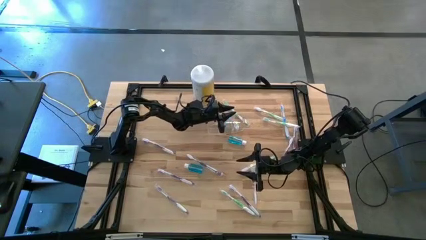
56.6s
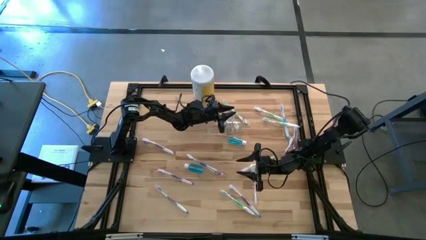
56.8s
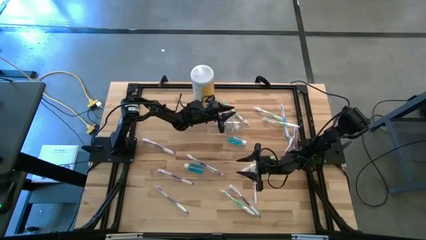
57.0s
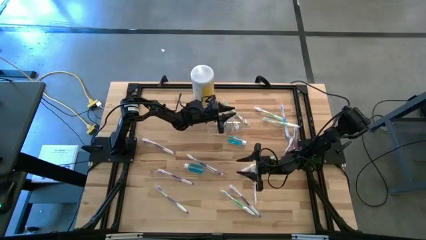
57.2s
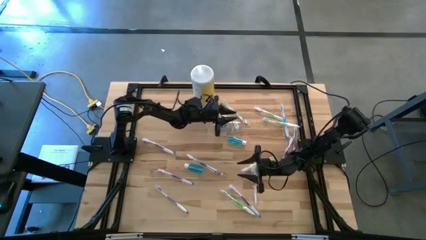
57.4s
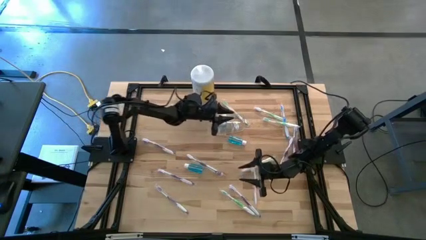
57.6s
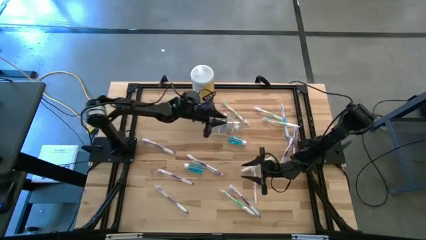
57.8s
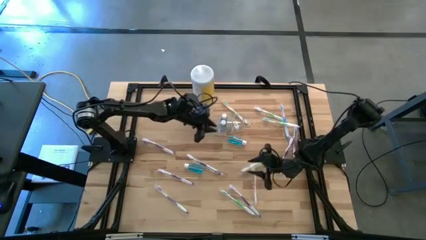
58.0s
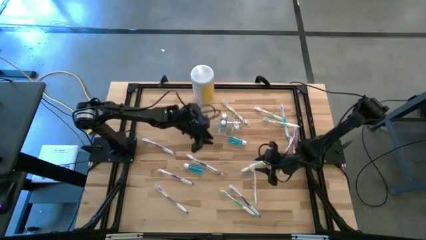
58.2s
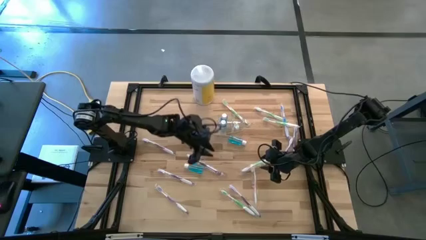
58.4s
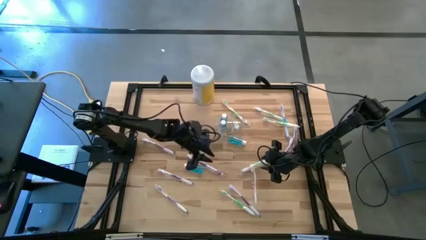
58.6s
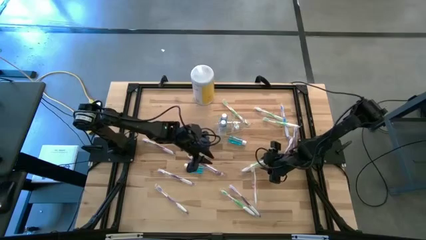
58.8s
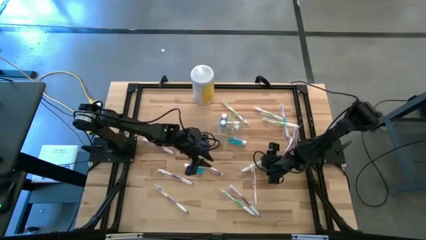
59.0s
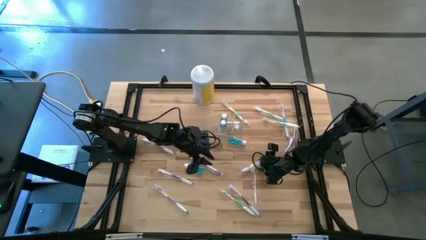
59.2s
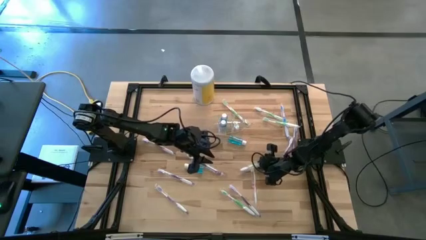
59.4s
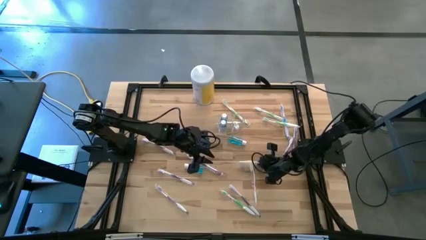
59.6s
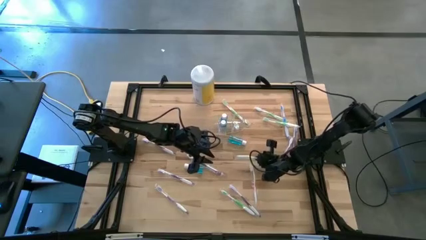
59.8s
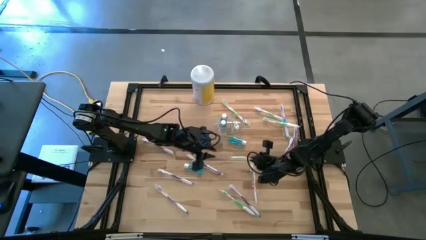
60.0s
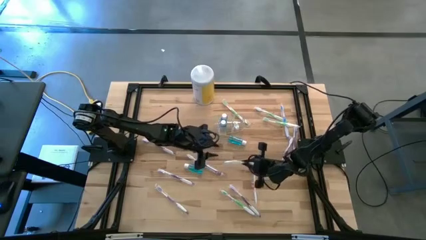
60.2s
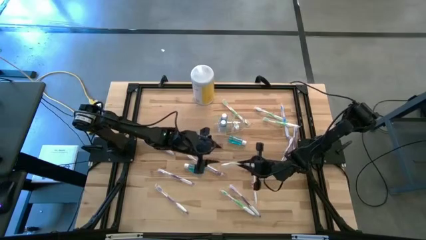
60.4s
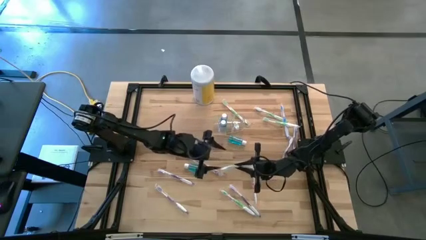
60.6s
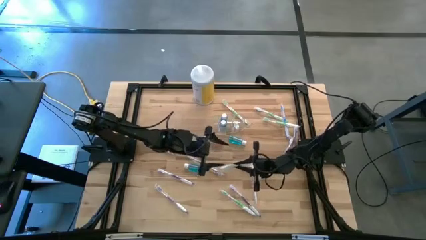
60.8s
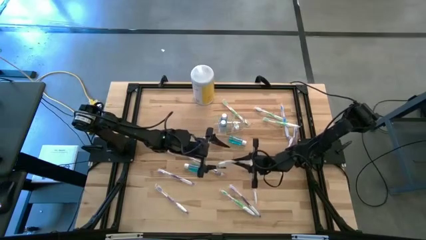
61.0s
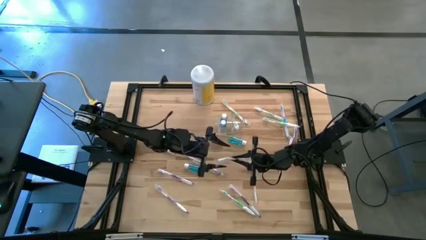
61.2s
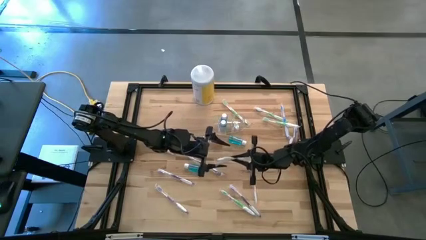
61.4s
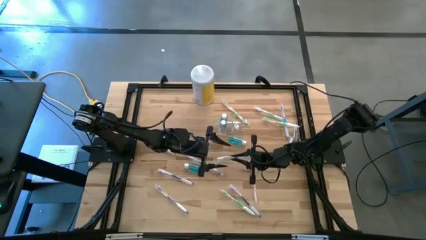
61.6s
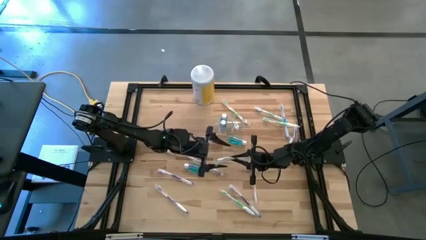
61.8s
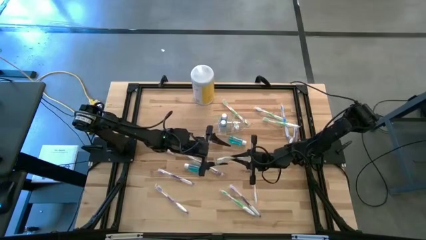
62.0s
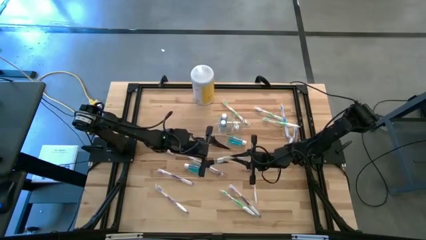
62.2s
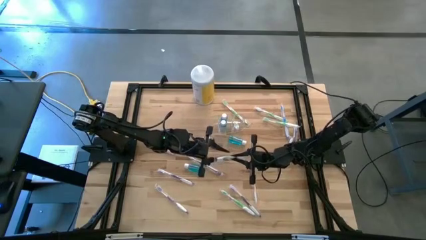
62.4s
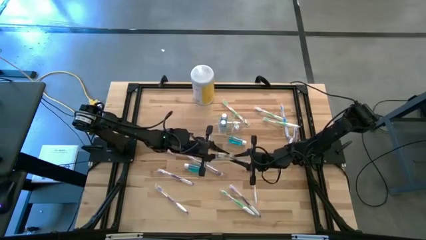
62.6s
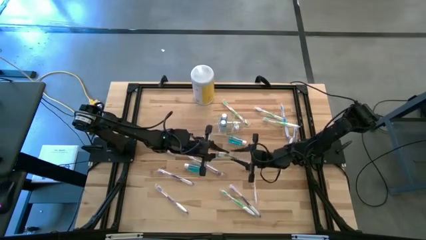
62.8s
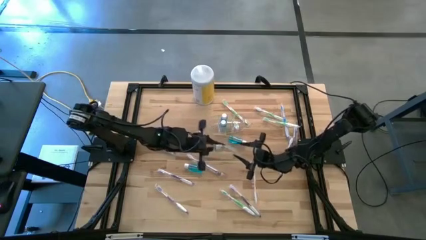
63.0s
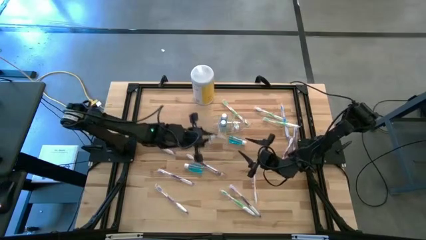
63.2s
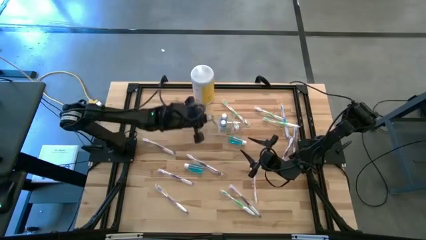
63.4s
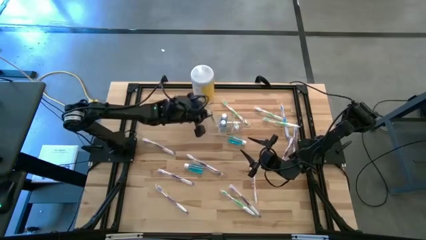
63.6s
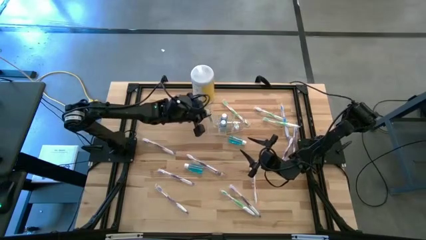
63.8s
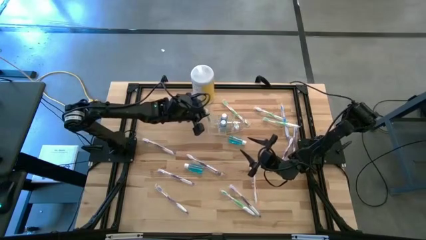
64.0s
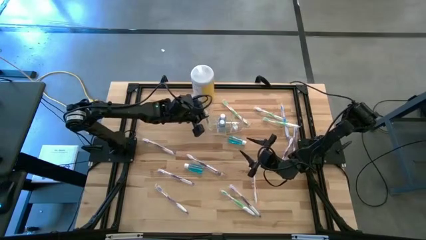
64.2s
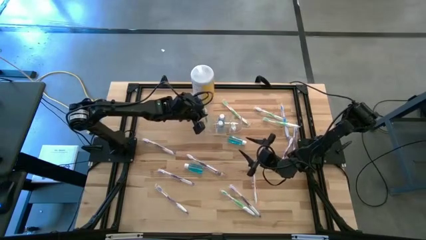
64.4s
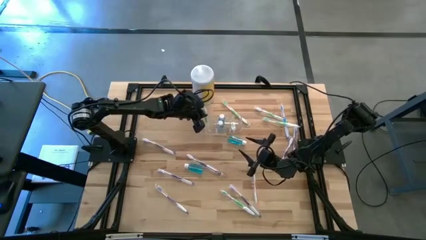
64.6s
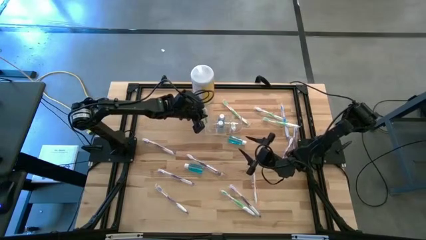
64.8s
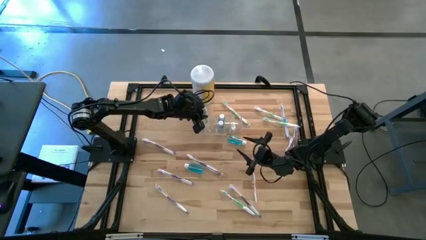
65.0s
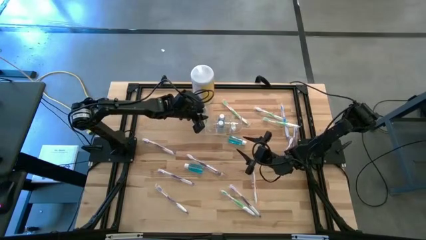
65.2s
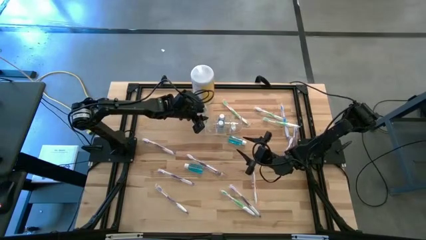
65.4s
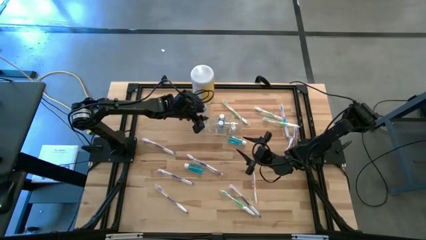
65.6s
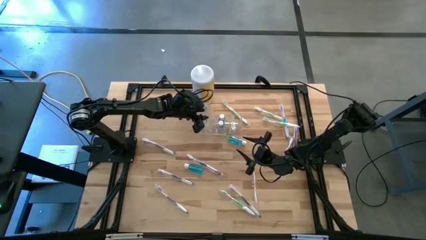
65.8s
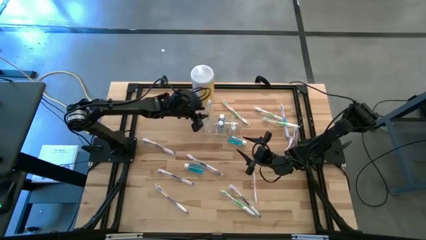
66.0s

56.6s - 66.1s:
Task: Pick & Place toothbrushing station
Put the green toothbrush into the transparent organizer

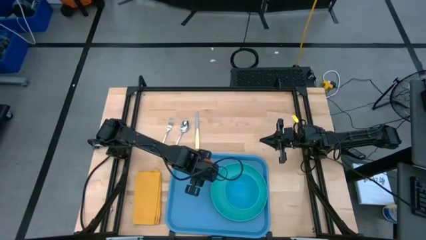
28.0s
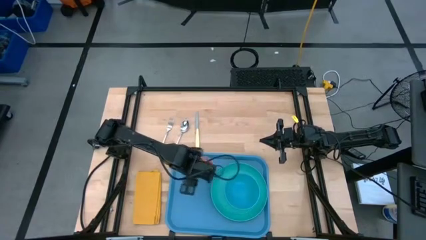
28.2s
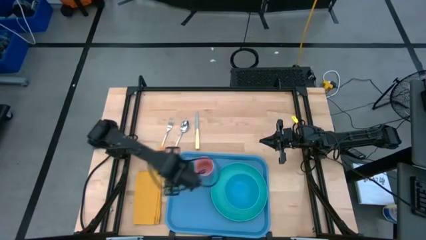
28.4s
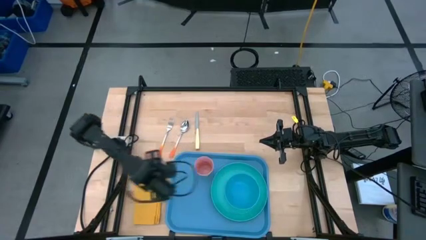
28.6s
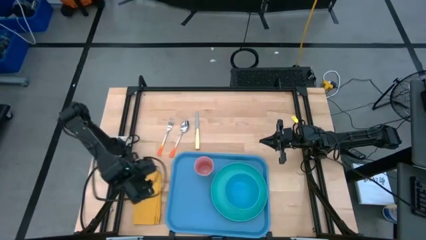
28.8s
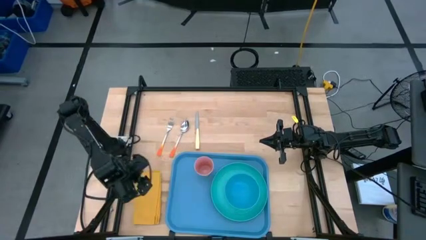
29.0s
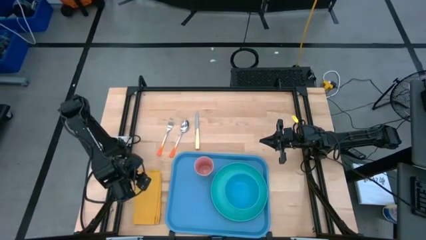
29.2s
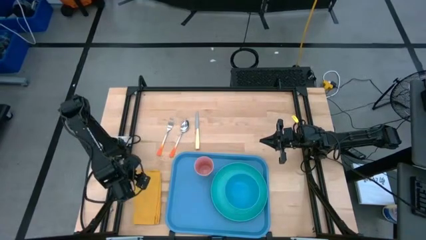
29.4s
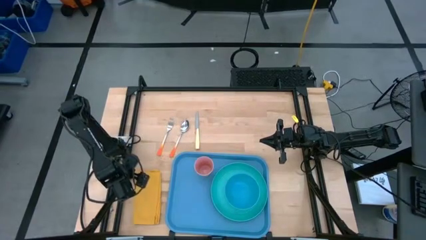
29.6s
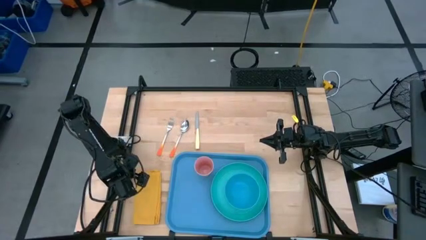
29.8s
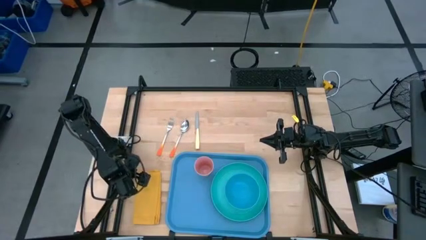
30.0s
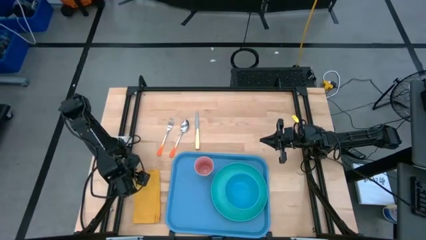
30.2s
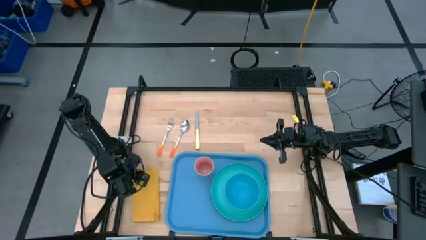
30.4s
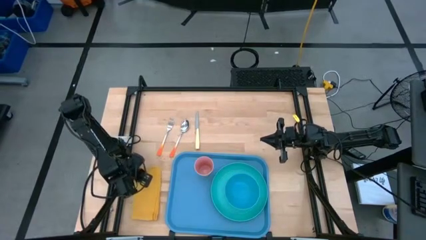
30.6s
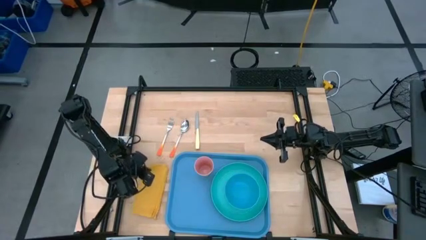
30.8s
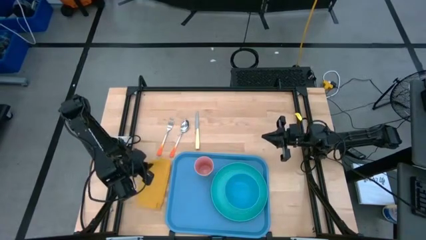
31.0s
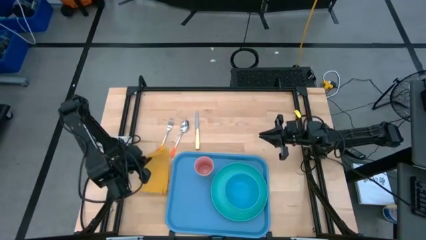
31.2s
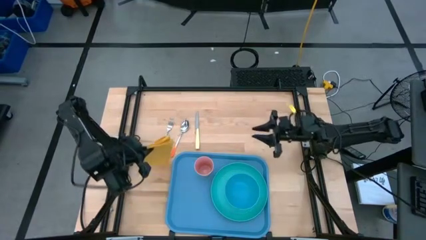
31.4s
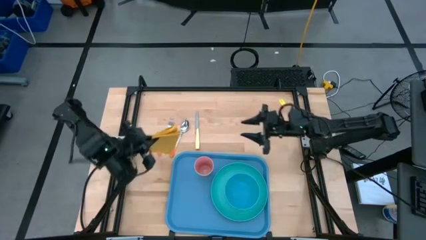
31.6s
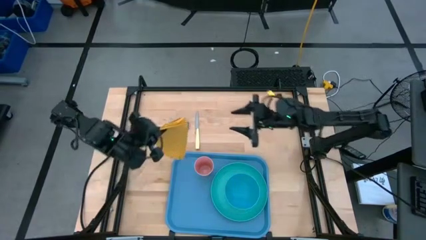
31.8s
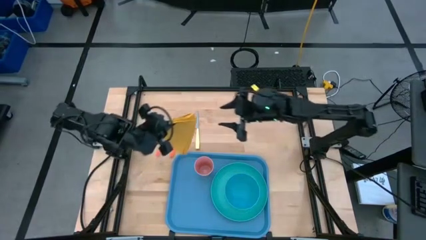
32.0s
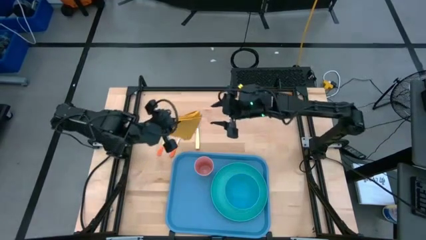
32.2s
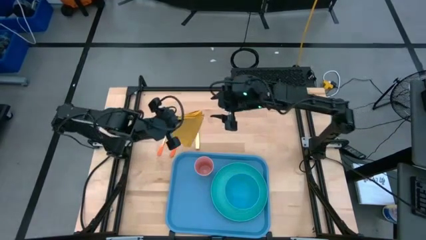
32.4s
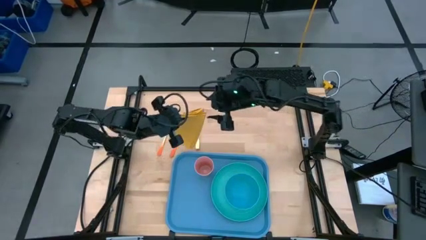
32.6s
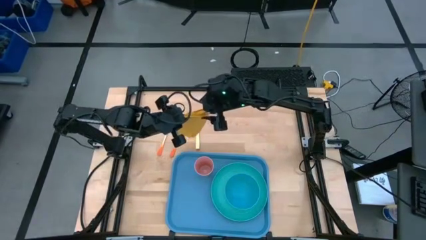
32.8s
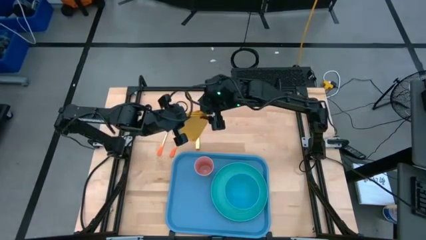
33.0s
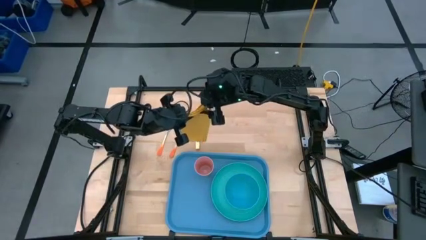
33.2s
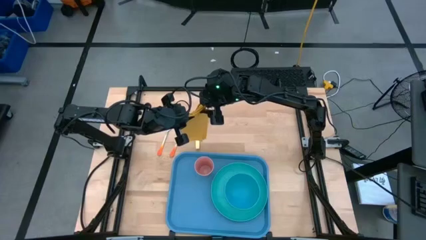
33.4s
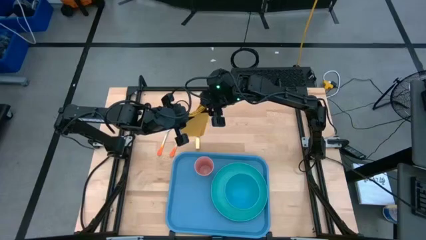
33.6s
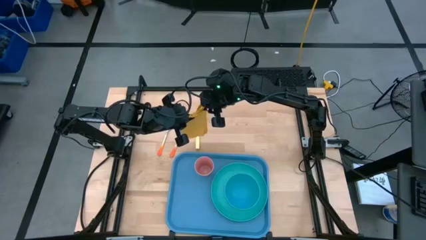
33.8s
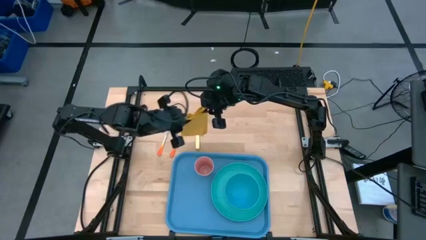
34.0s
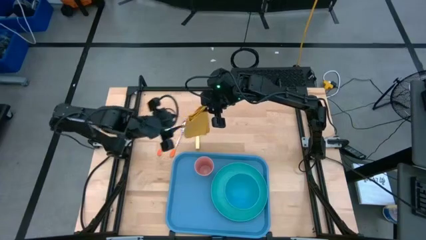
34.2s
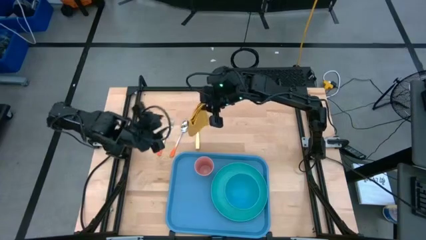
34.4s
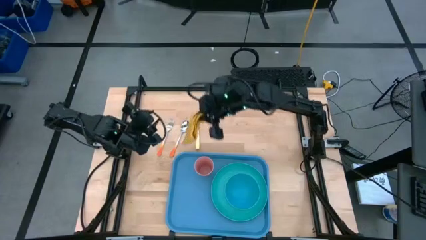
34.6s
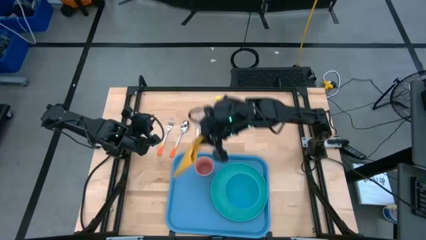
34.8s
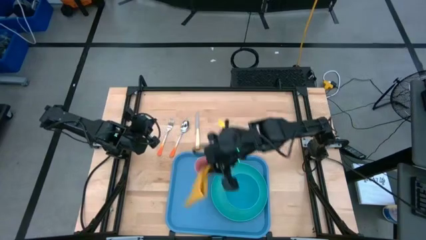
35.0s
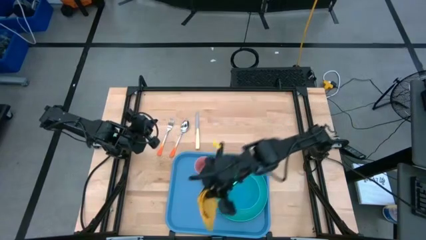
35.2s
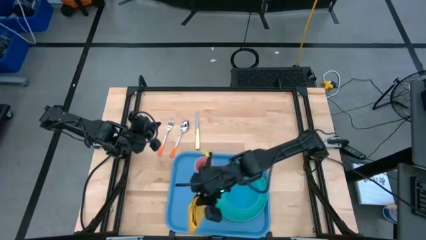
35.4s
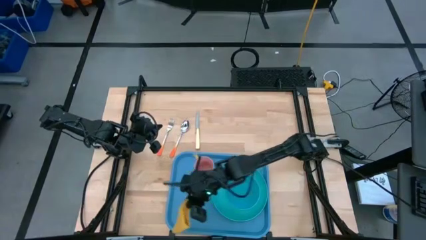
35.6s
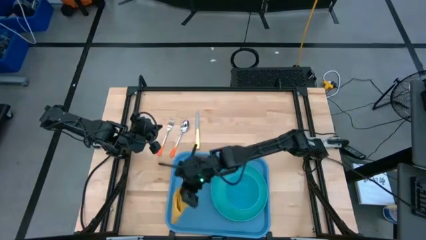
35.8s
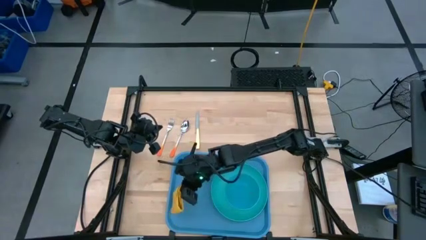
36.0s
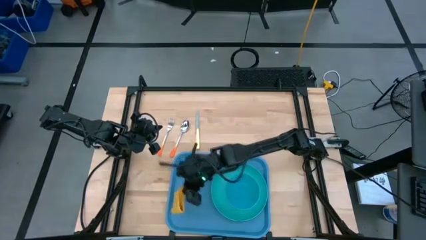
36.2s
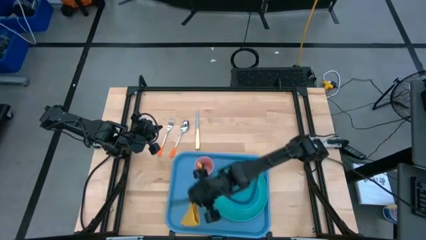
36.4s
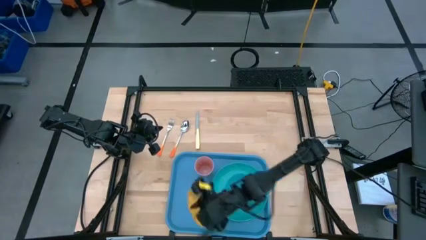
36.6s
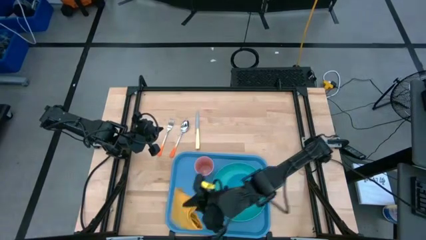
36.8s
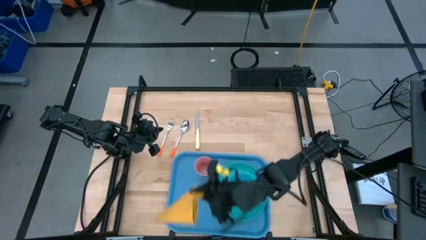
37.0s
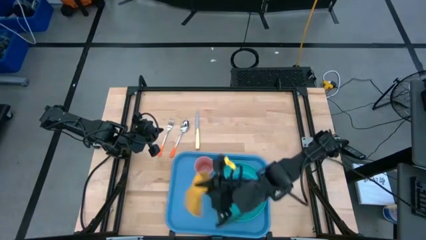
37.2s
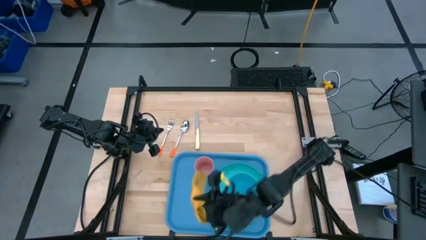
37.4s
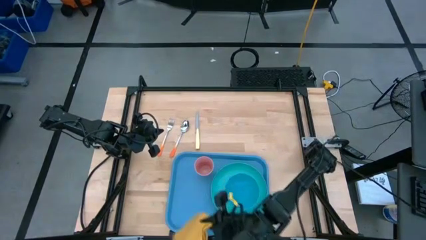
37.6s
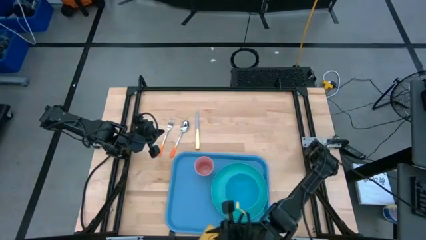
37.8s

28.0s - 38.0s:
Task: Set up tray
Put the yellow napkin to the left of the green plate on the blue serving tray
